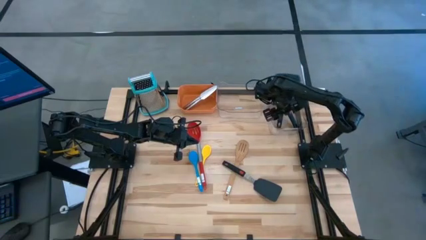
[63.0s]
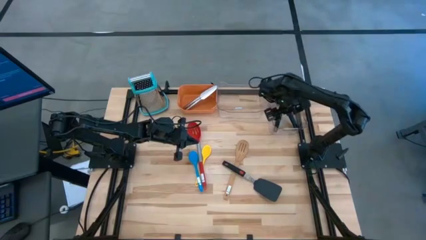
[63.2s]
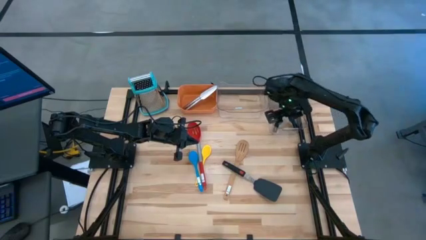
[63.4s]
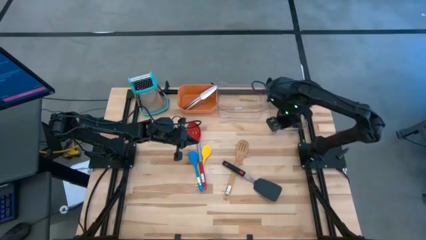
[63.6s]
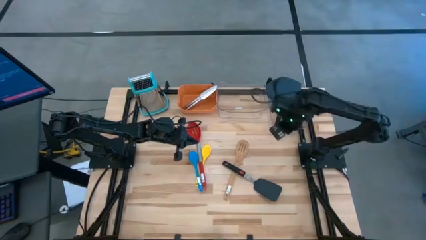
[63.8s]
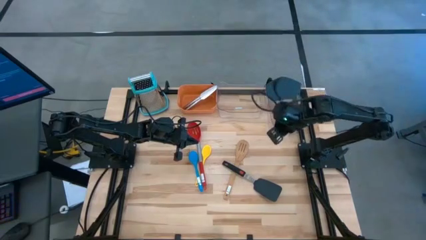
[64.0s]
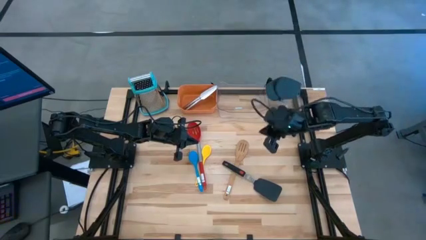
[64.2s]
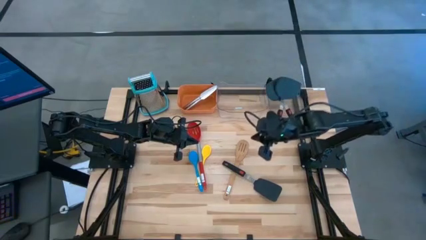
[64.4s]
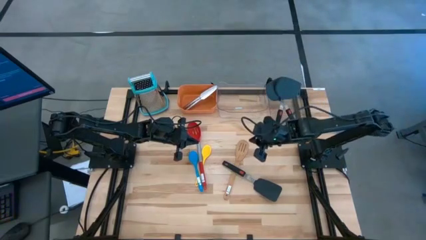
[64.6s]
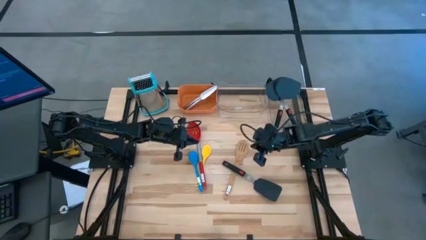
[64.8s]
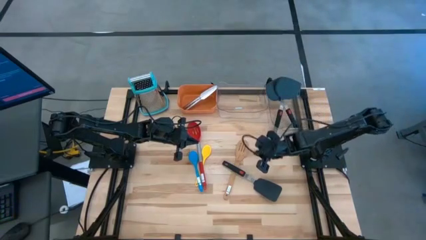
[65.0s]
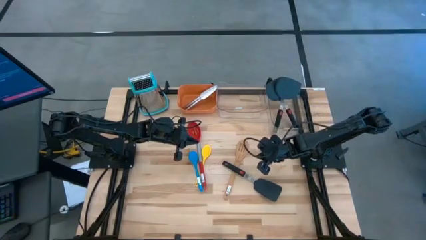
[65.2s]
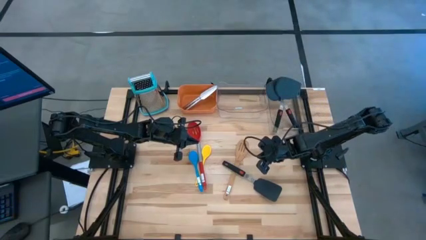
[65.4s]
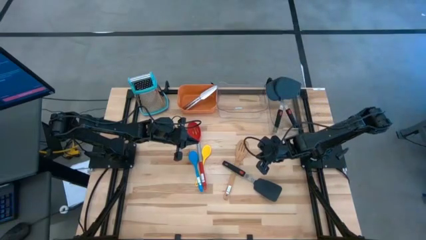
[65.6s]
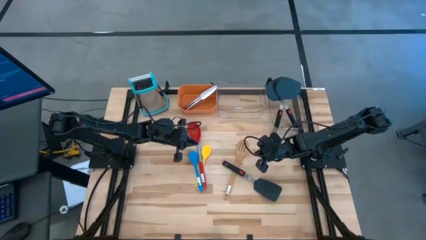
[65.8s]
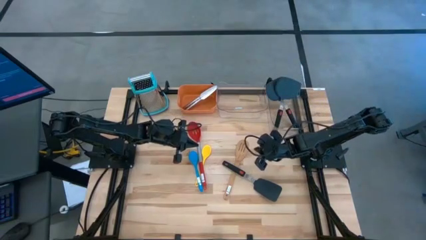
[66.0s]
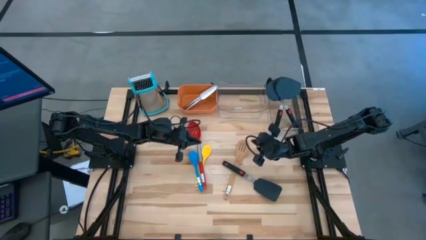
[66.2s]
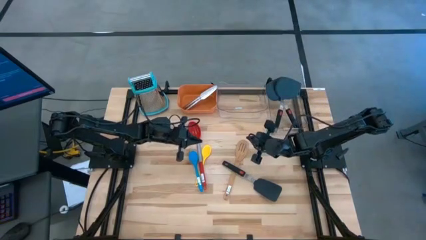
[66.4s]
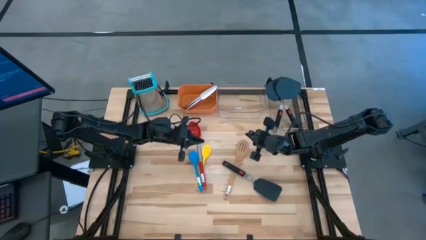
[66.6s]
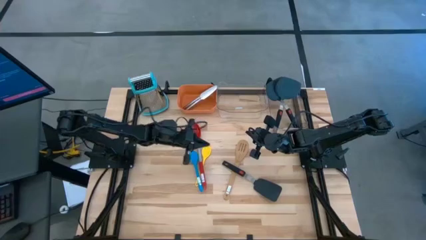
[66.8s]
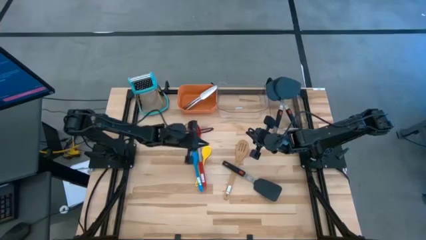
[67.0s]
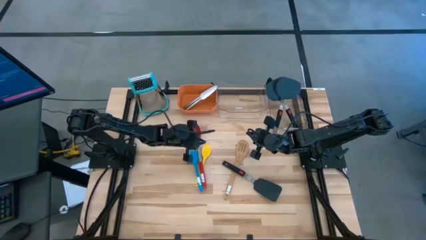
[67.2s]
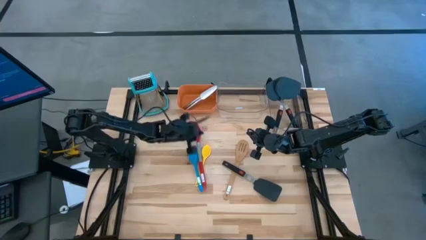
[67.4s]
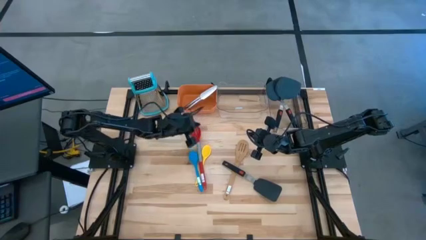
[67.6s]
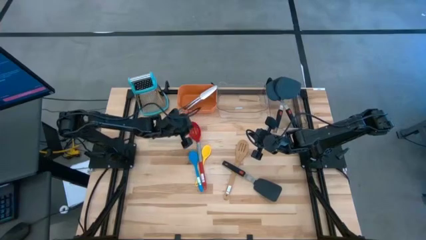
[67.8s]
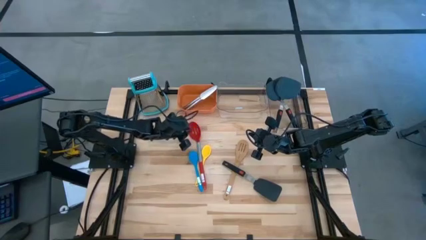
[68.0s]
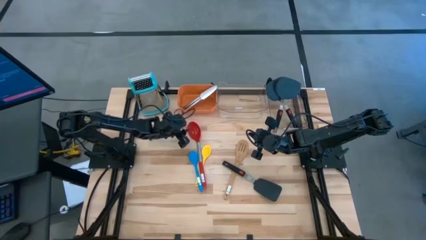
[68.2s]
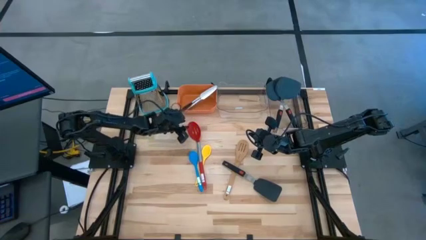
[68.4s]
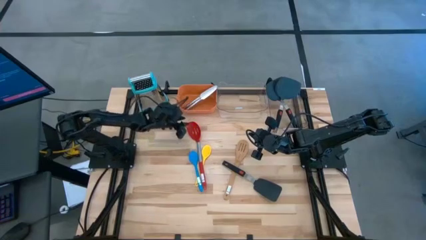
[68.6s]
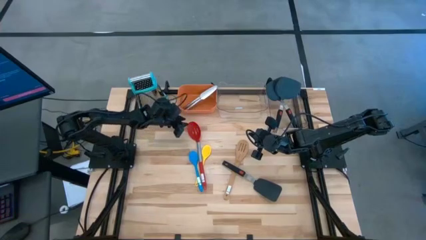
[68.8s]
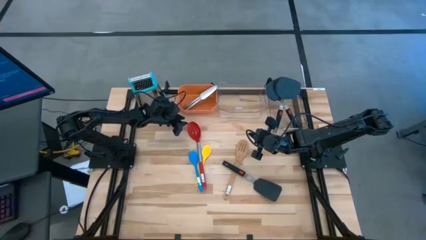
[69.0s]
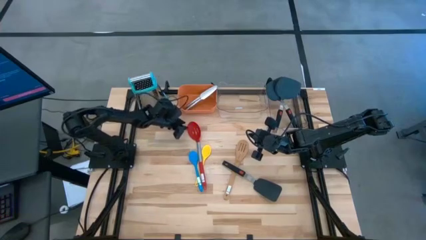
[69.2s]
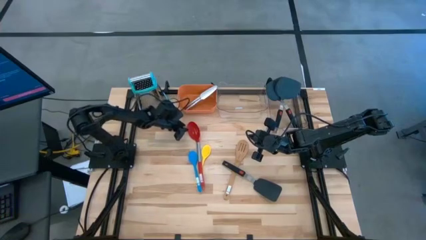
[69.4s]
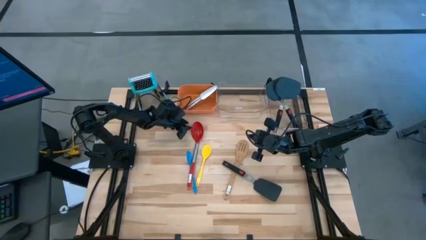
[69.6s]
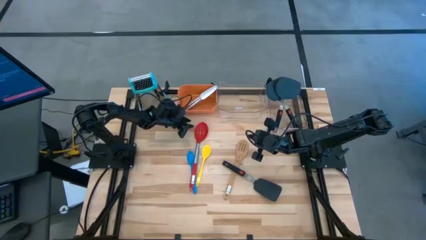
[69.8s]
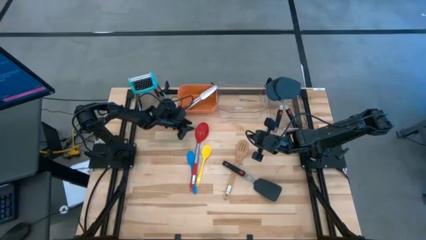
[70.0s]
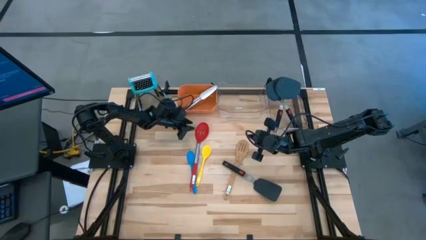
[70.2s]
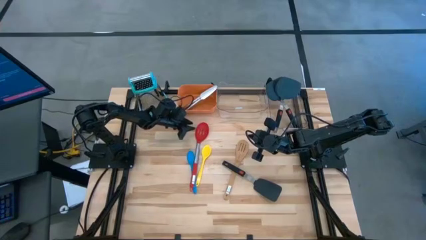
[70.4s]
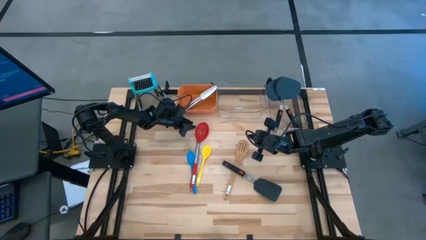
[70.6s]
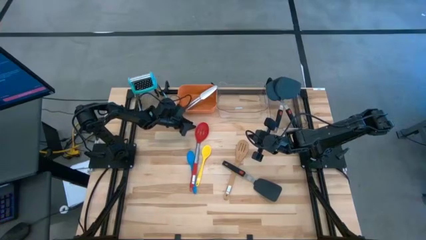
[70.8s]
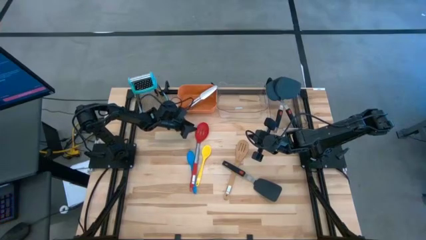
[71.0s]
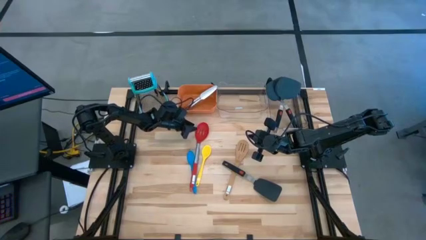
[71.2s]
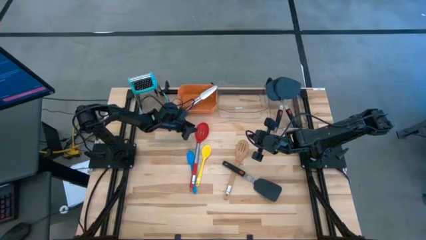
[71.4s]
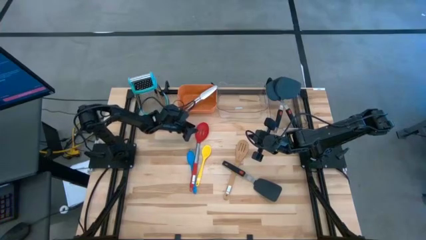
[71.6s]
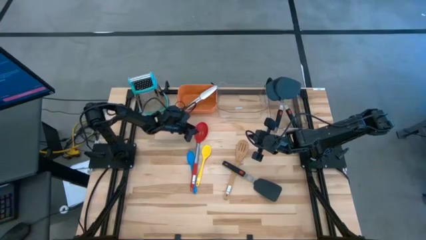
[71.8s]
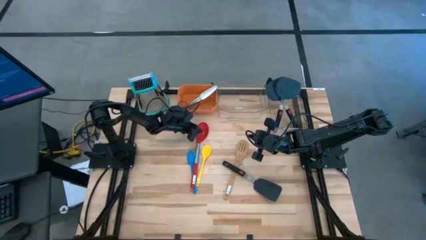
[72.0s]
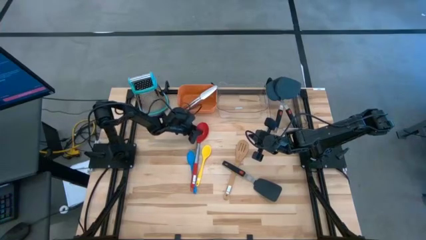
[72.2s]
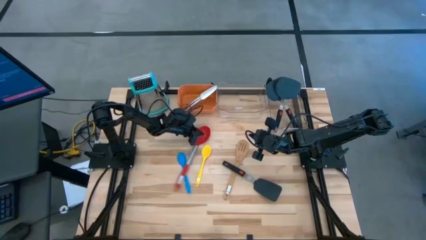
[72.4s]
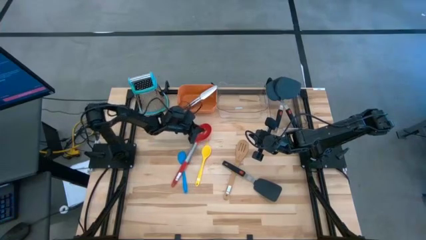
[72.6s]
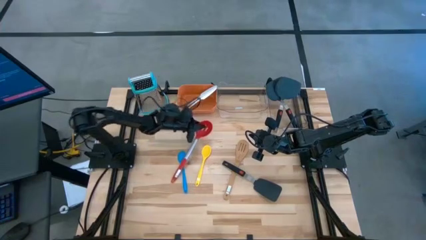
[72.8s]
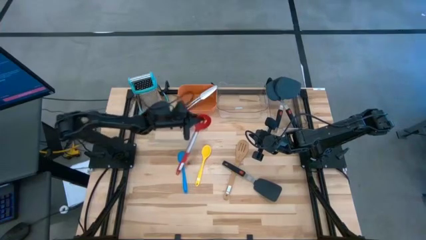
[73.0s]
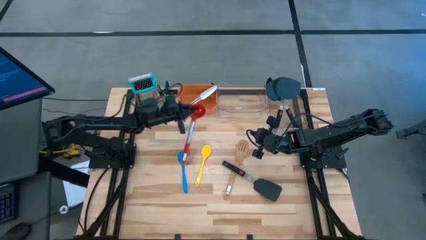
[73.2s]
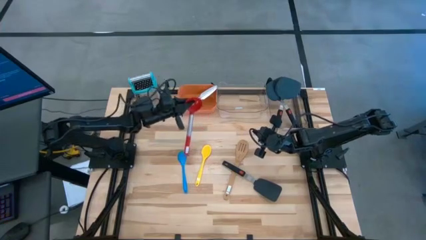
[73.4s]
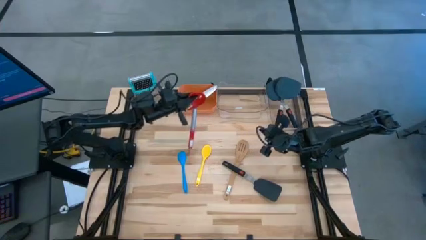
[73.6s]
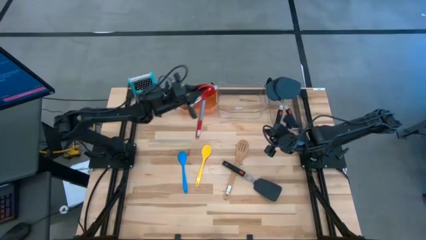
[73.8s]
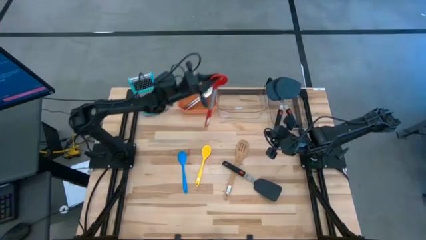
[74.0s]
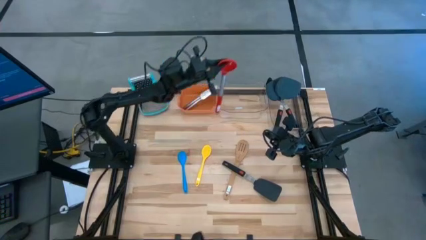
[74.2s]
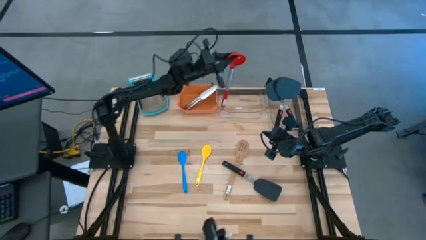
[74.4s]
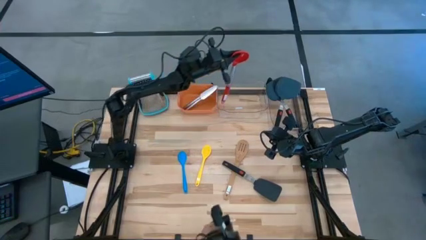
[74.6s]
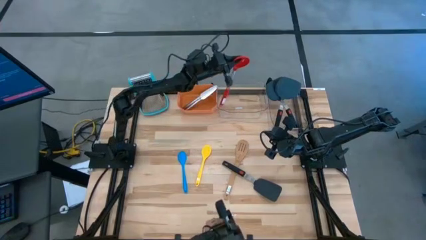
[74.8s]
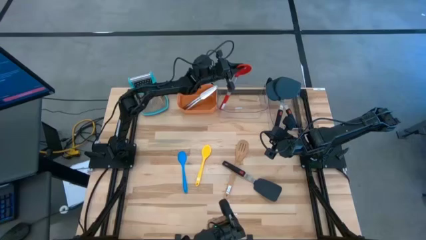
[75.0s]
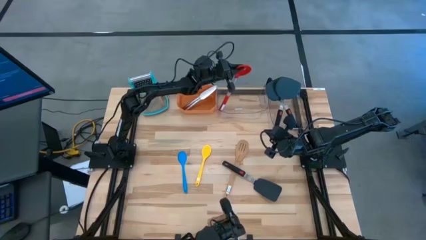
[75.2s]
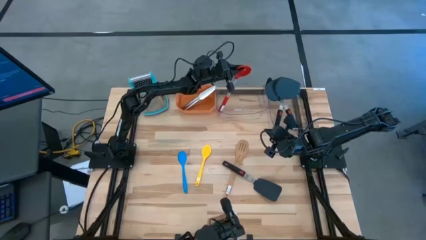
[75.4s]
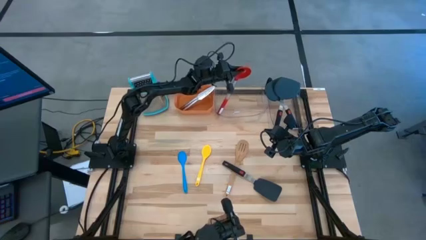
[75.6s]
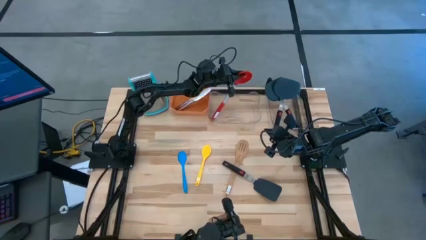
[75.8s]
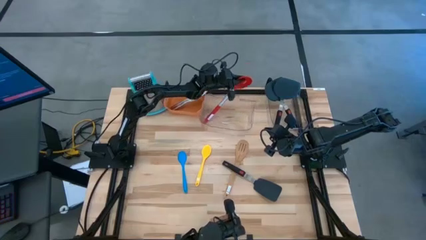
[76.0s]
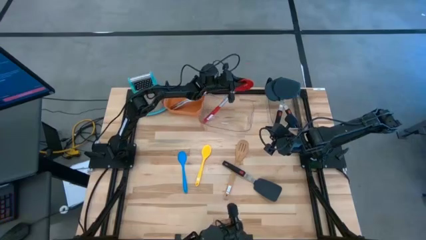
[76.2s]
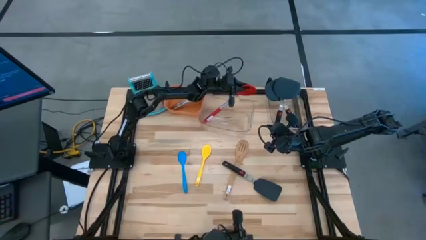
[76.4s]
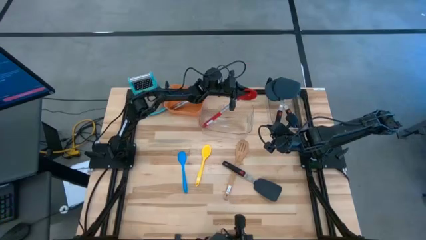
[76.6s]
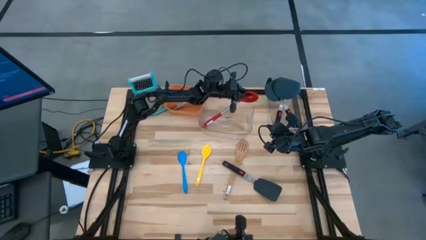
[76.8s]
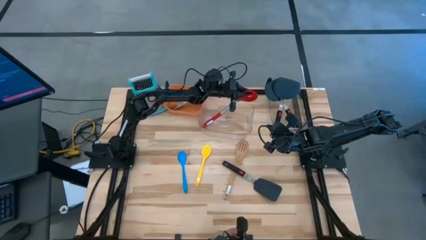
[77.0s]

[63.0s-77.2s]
Task: Pick & Place Kitchen Items
Put the red serving spoon into the left transparent bin

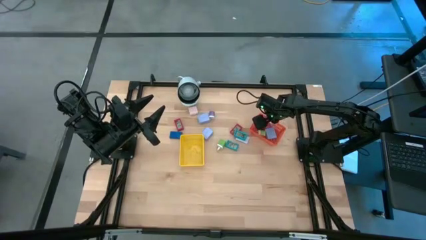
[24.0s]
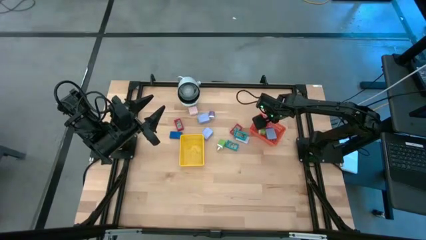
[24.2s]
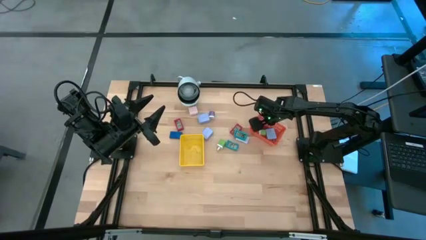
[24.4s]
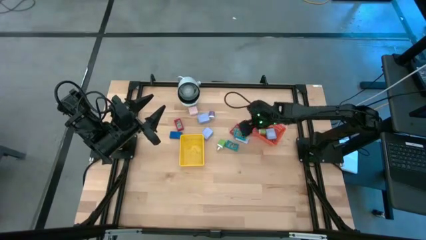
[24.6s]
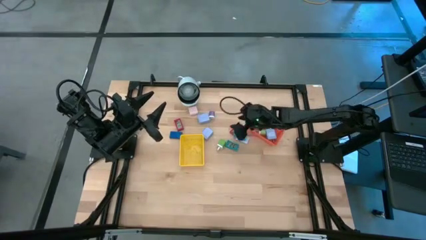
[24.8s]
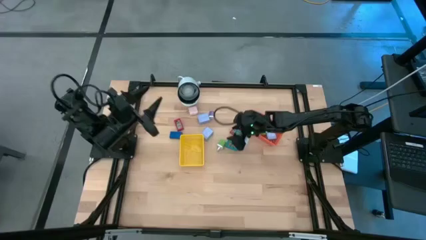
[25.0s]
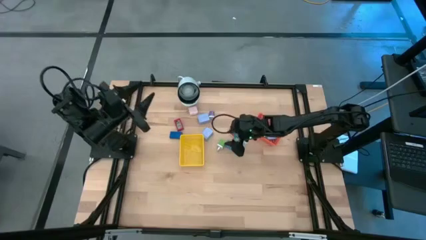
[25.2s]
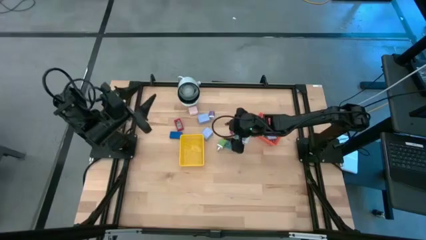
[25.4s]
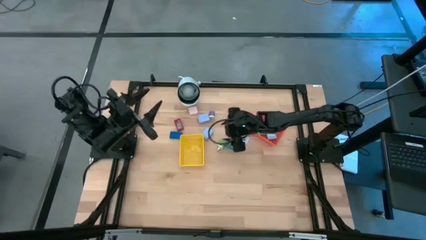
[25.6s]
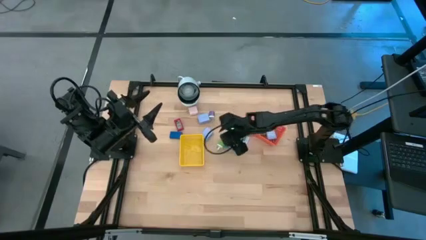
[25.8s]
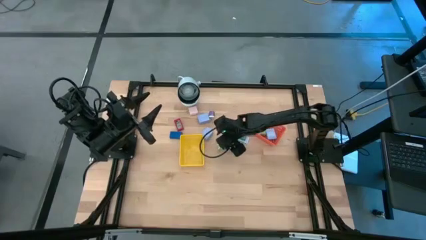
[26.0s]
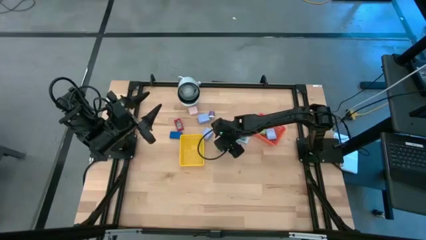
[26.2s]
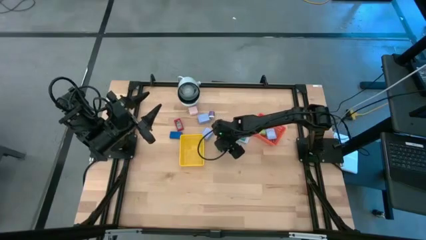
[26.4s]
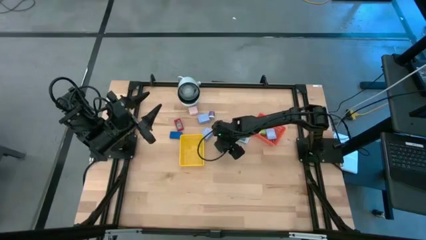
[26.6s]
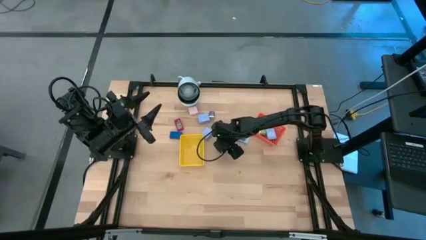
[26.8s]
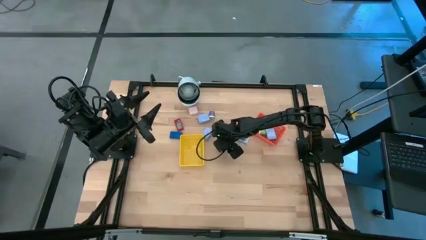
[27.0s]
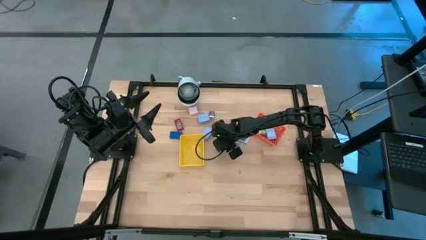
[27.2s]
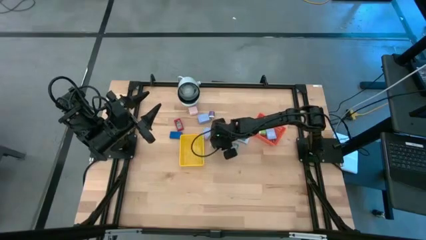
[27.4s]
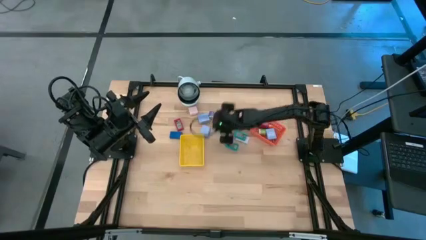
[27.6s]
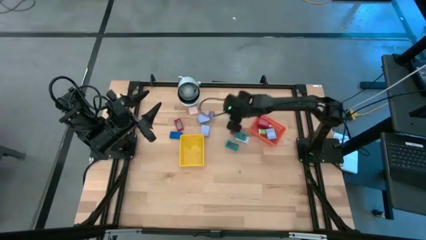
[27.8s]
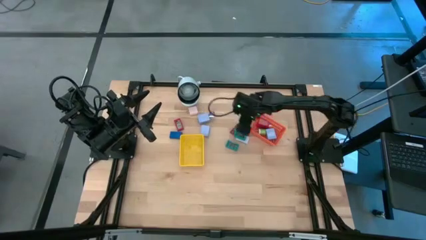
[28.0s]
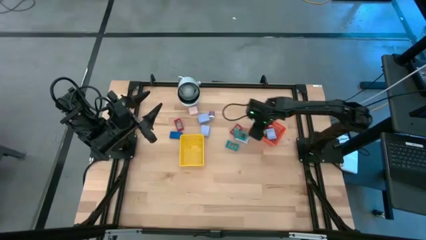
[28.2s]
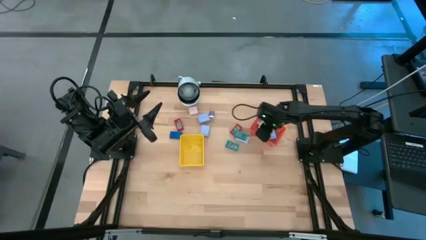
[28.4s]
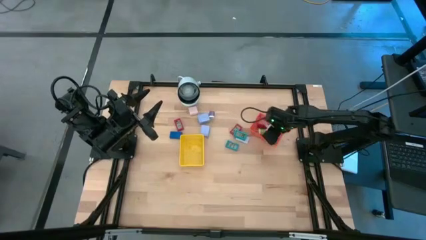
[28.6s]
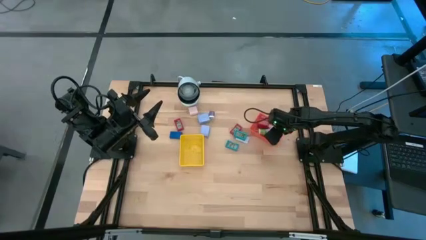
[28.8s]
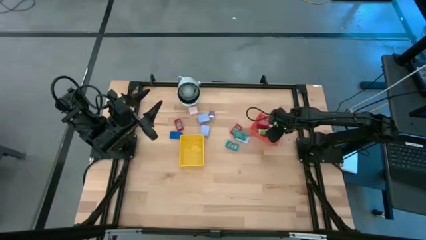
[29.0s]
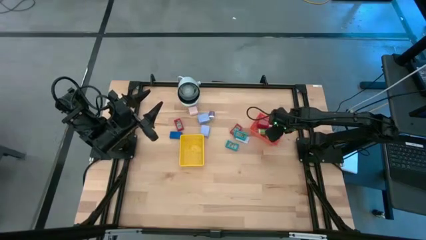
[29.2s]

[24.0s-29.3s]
Task: Pick & Place Office items
Put the green charger adapter into the orange basket
